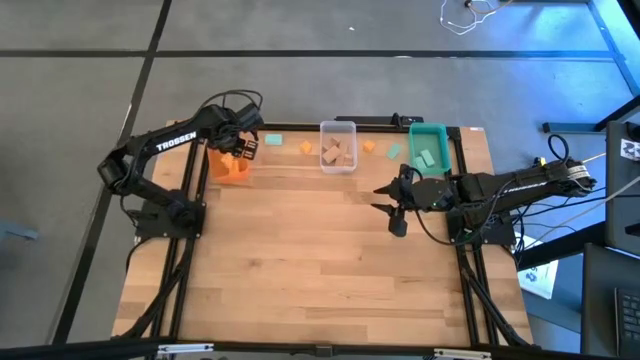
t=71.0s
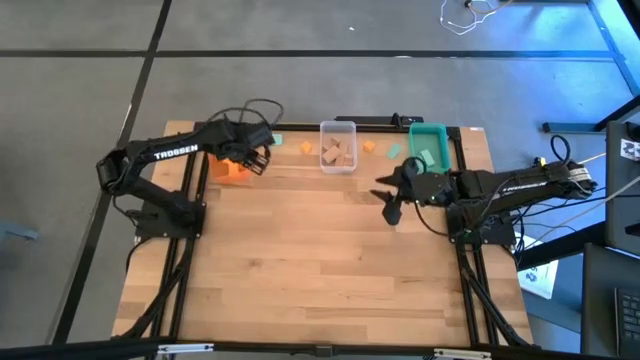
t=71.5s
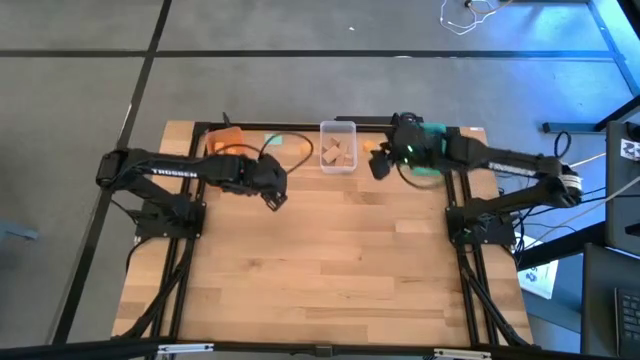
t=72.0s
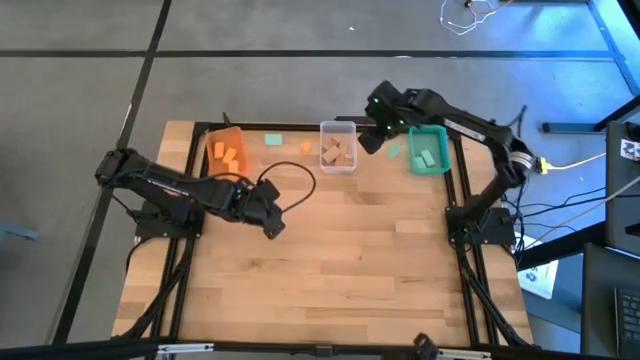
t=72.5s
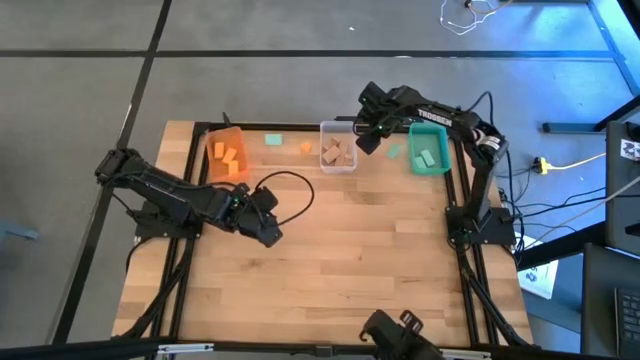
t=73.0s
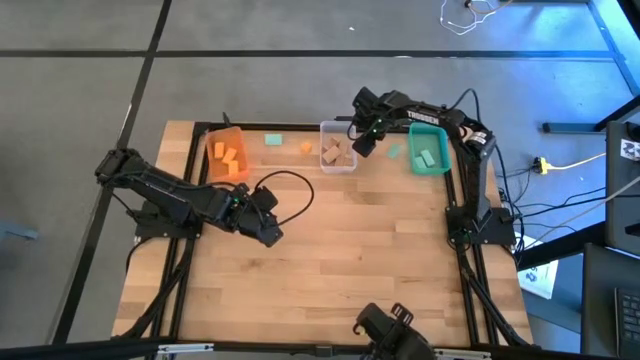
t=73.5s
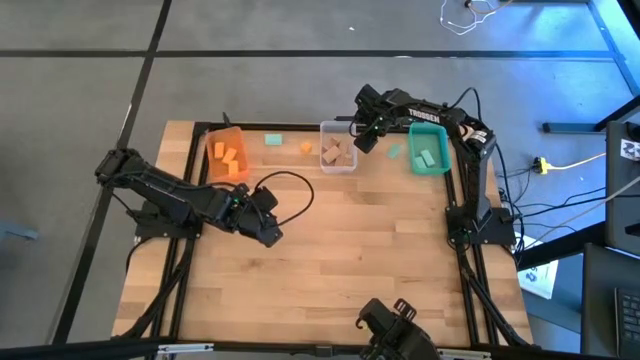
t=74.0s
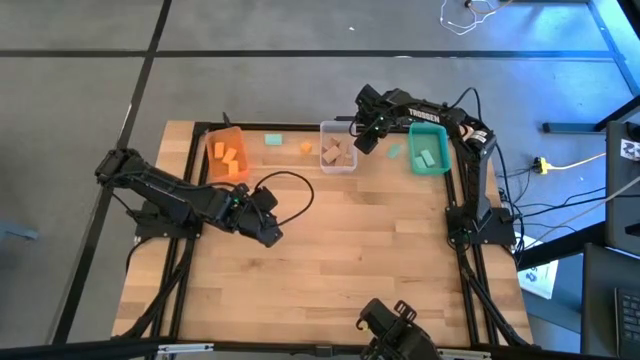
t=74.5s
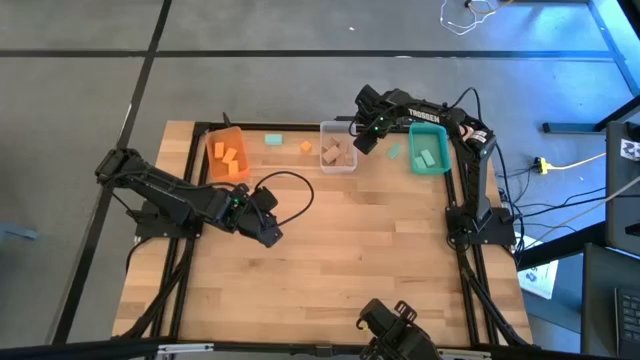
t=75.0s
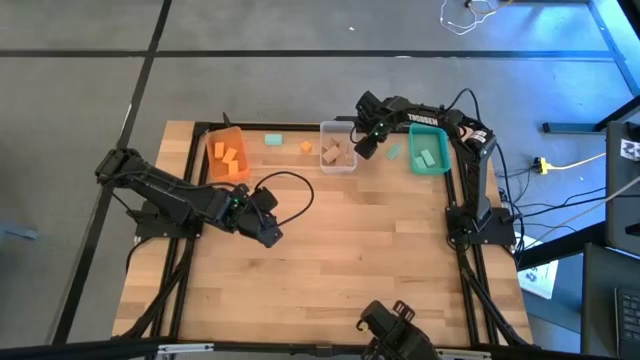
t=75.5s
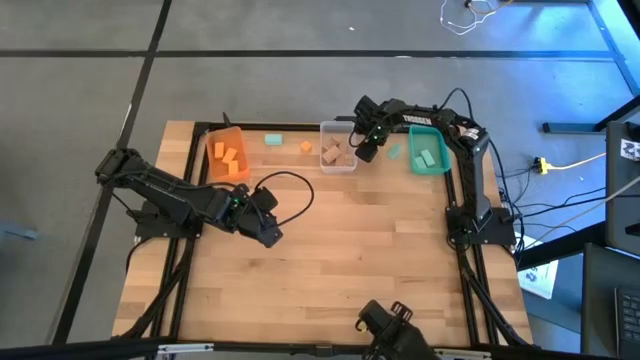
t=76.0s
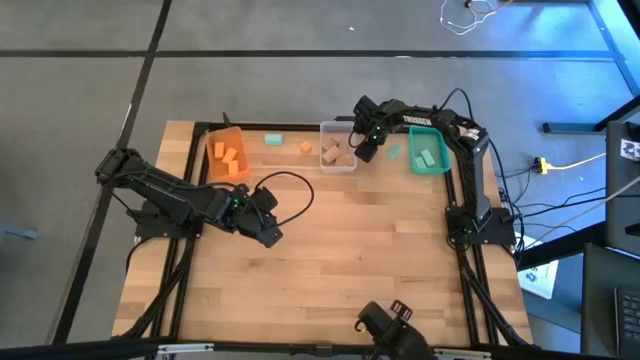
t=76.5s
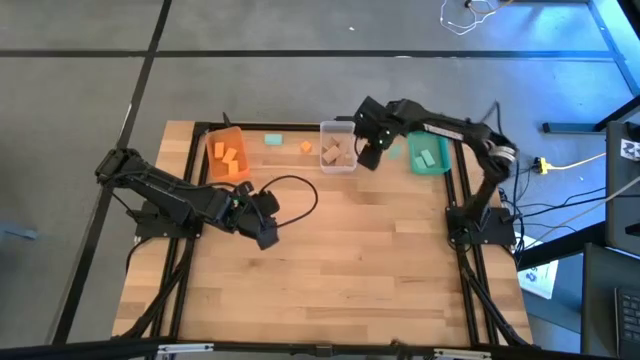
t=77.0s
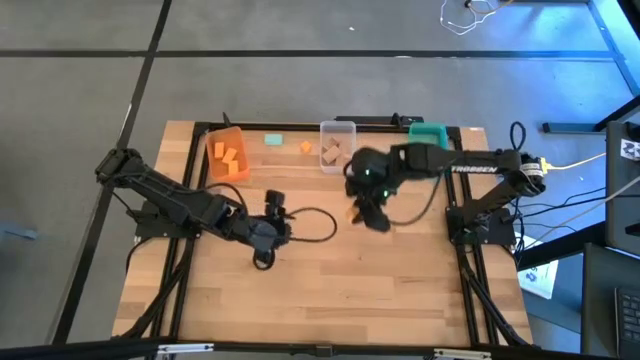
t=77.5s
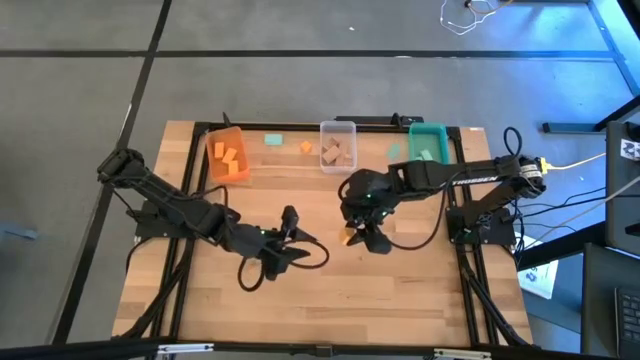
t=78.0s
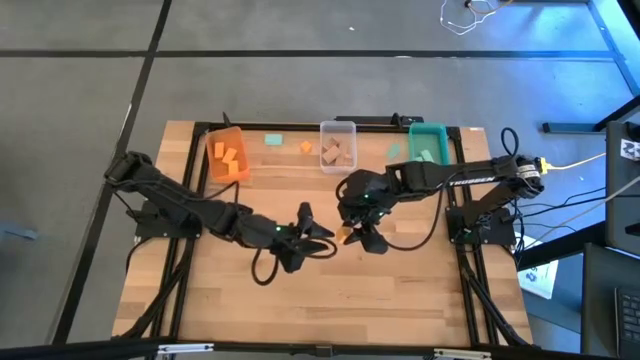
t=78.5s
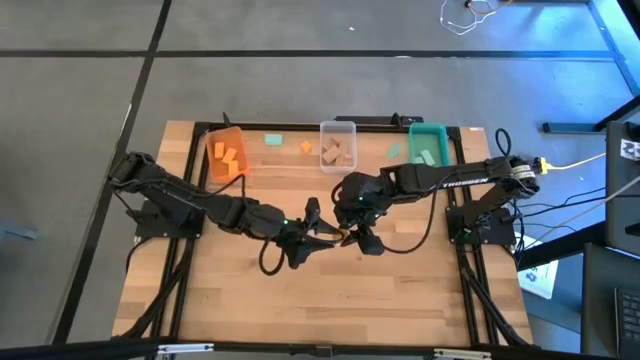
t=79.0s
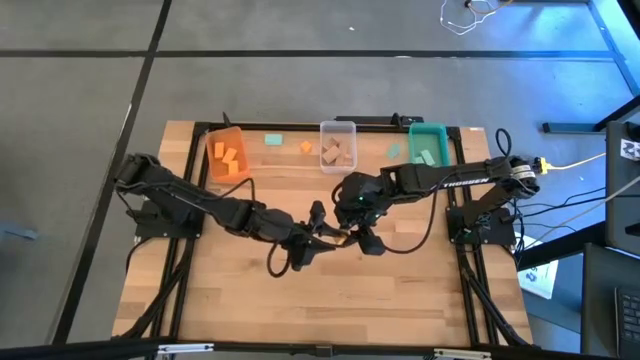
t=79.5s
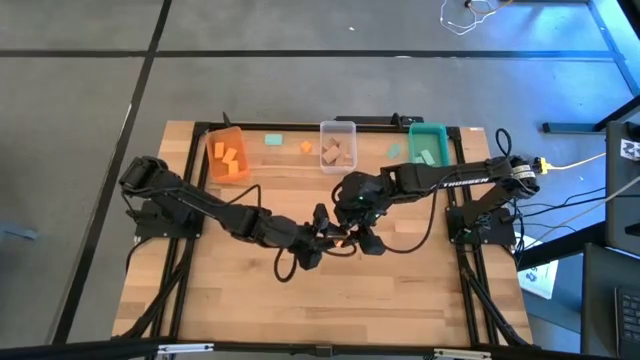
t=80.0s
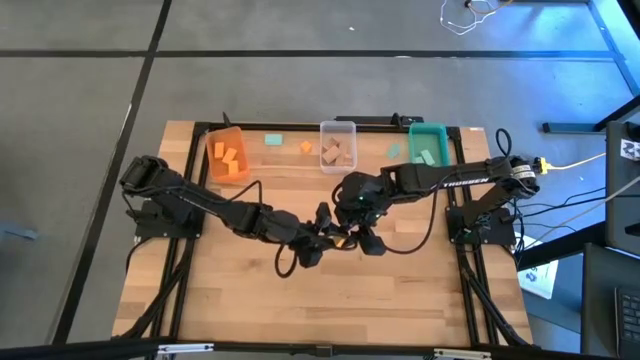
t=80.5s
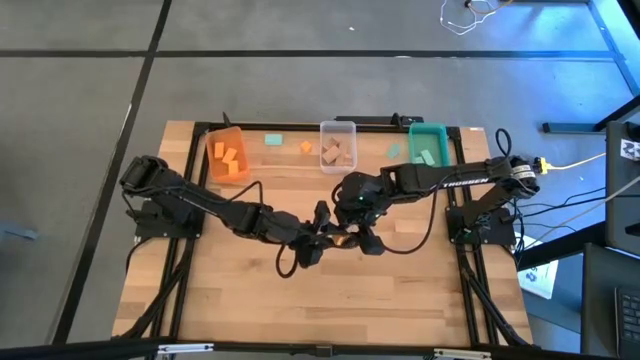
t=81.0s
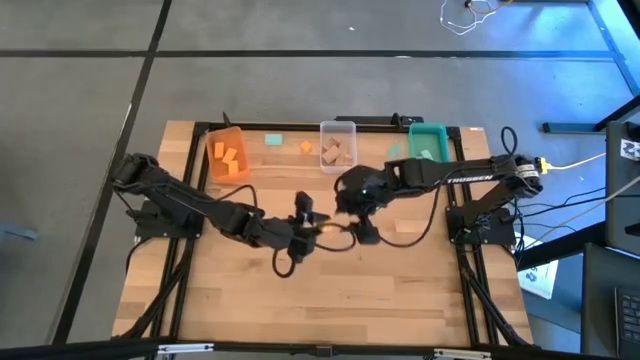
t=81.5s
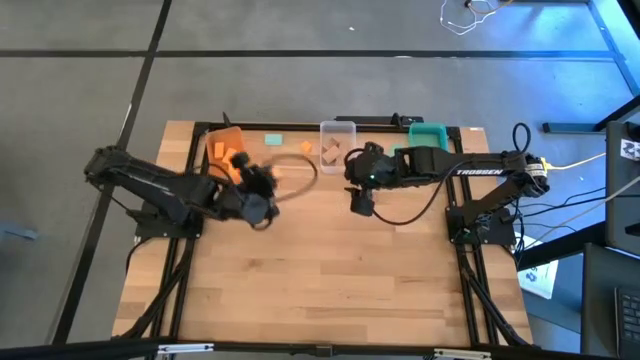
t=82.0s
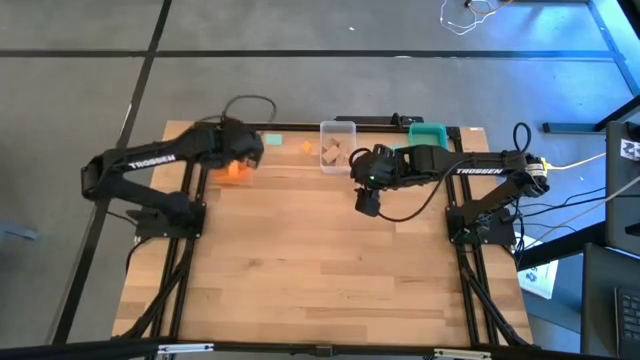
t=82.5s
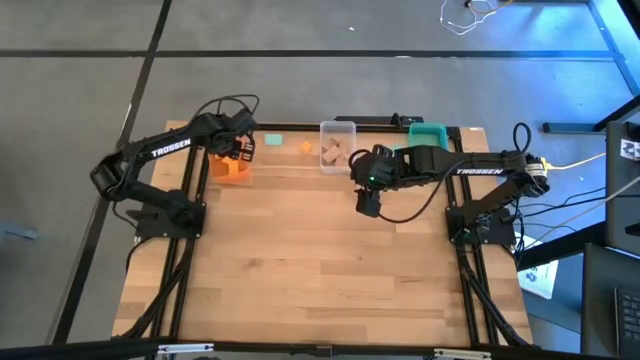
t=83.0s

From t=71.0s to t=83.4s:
Task: Sort & place blocks by color
Put the orange block into the orange bin

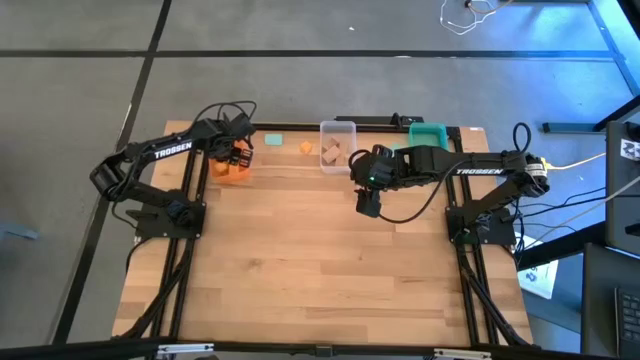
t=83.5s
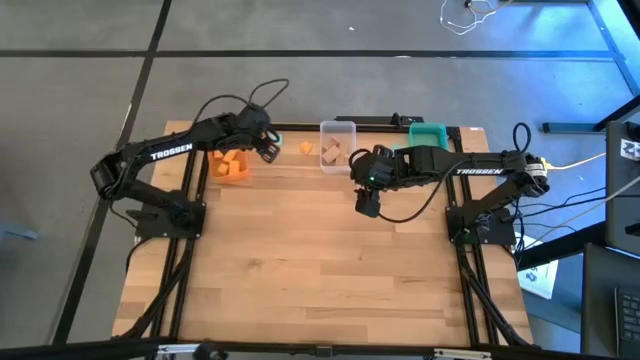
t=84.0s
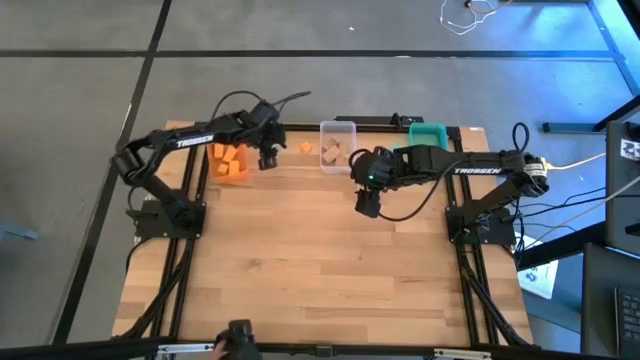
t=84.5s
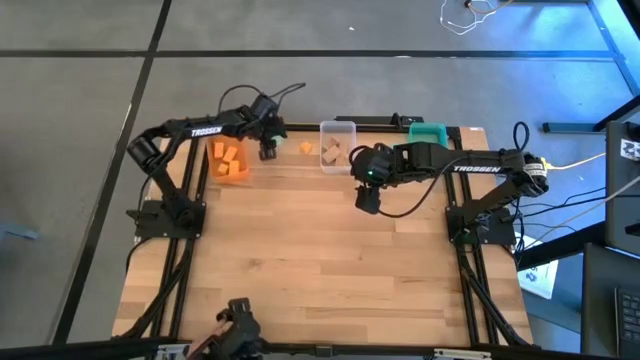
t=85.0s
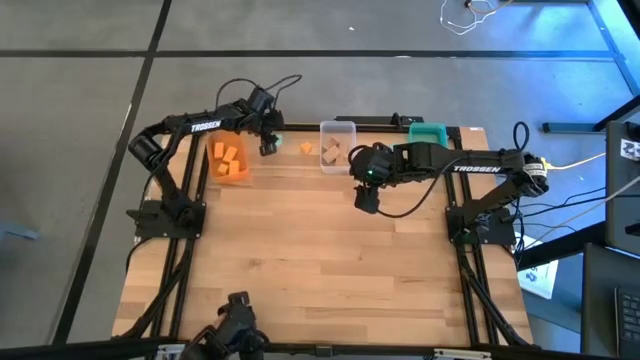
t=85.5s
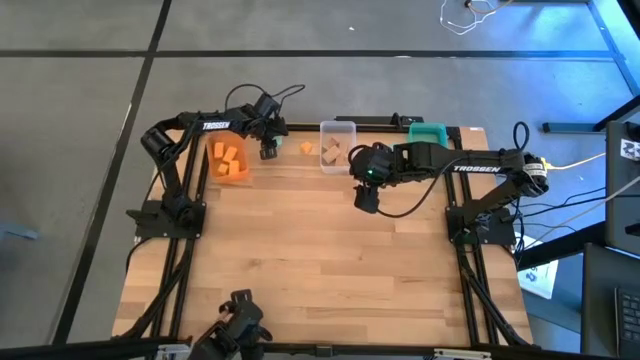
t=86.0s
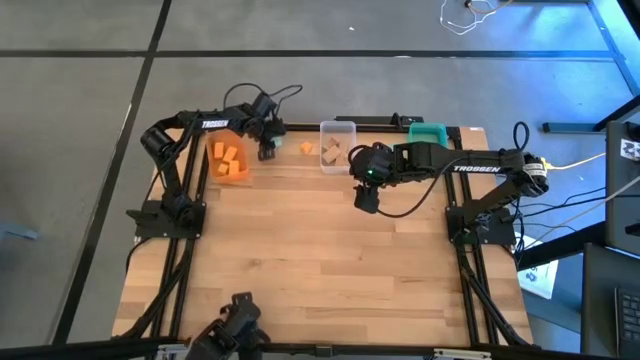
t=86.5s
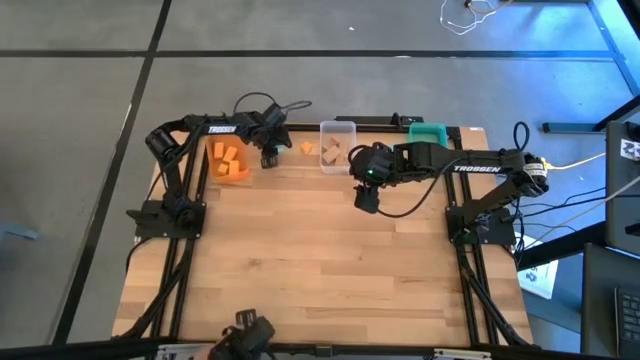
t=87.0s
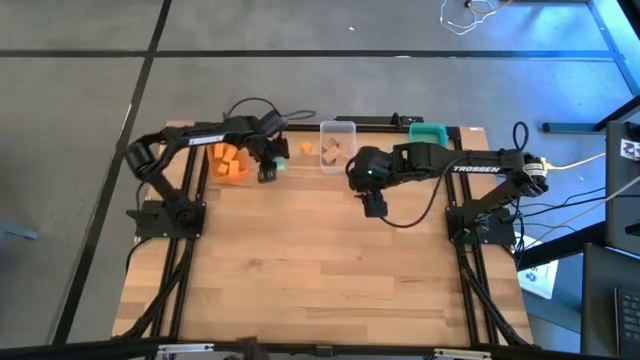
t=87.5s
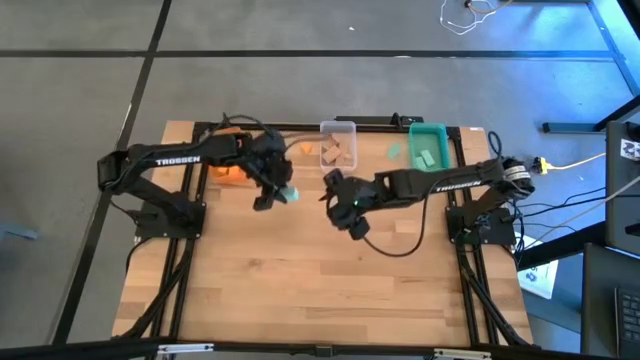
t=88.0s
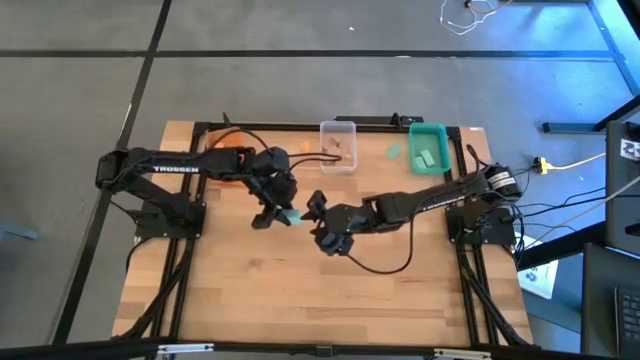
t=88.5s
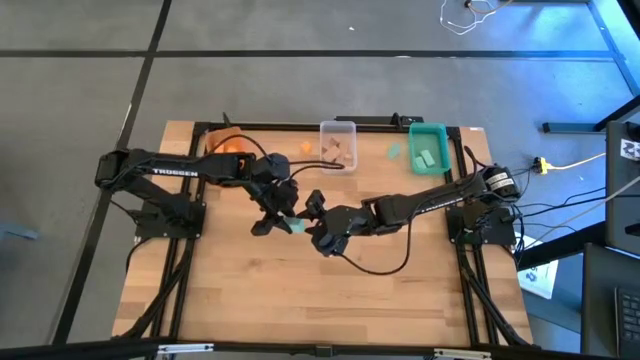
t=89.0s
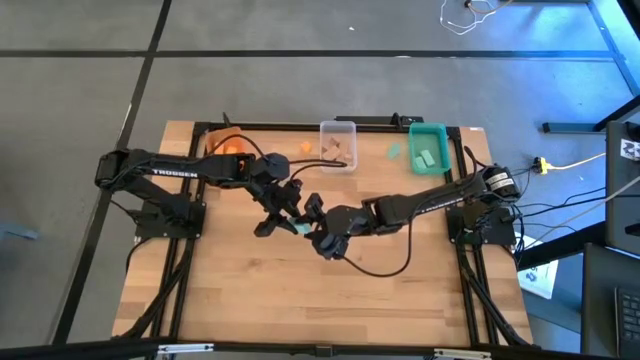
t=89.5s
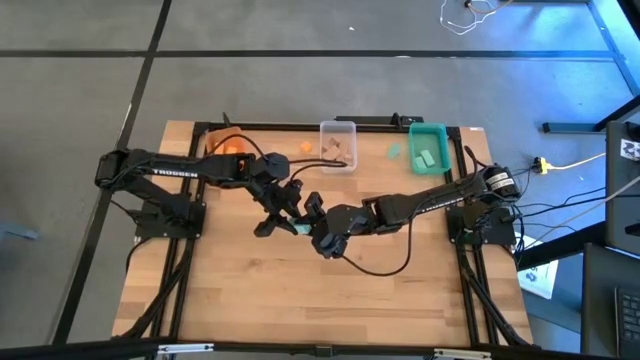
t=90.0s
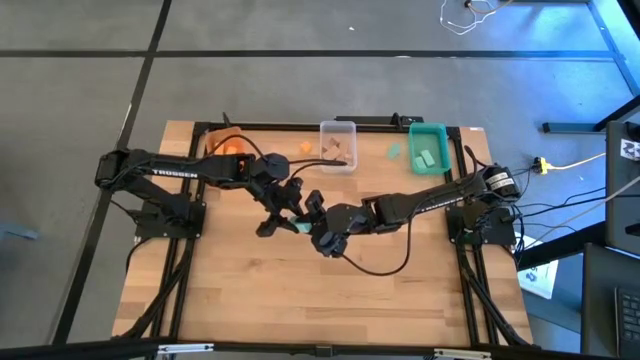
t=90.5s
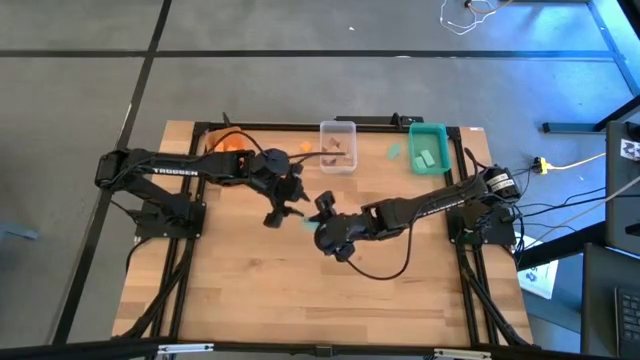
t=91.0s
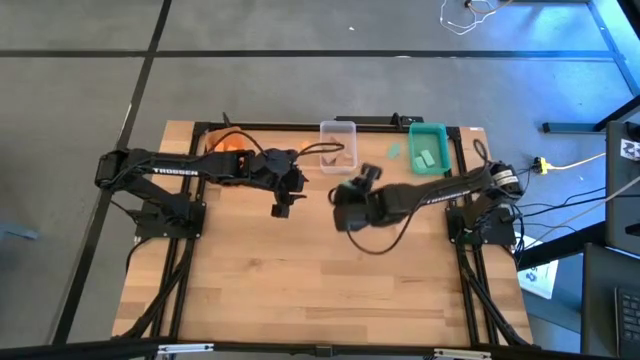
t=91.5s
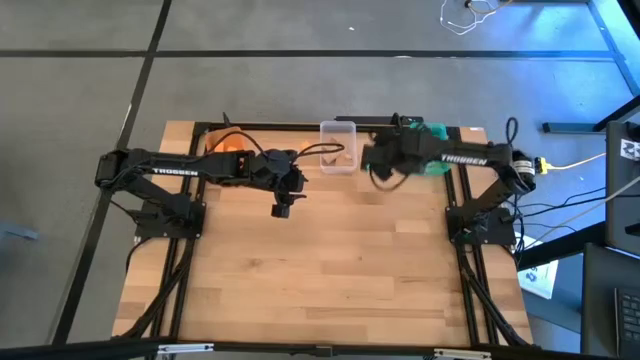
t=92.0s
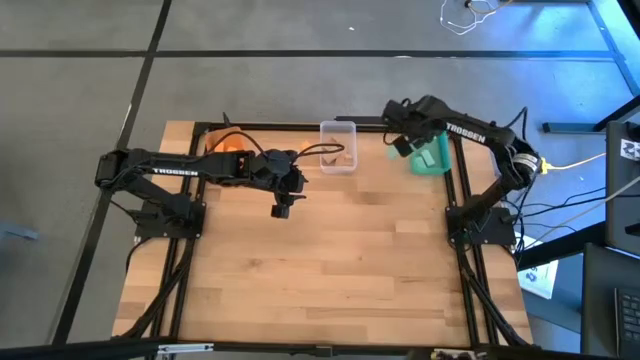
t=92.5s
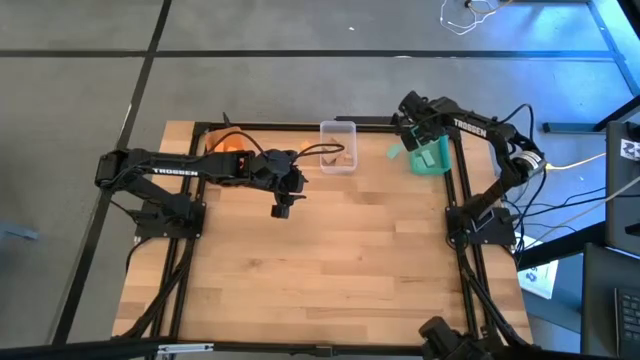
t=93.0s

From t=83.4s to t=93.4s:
Put the green block into the green bin
